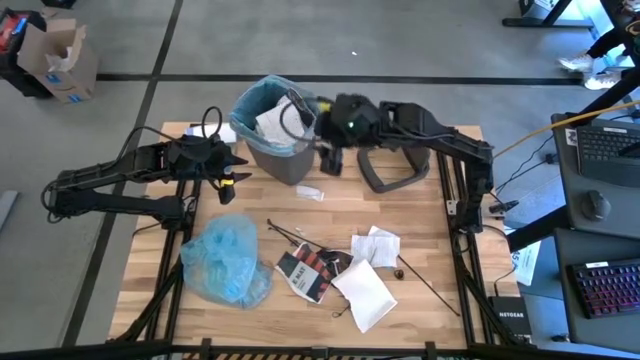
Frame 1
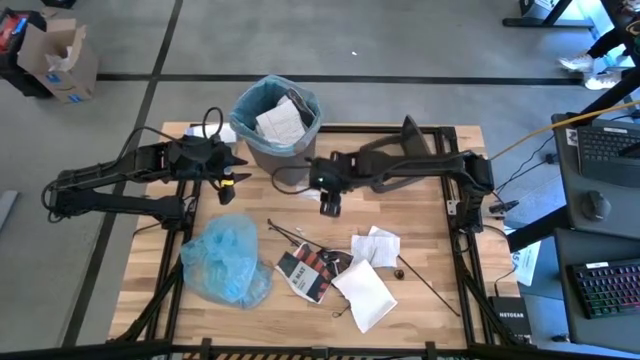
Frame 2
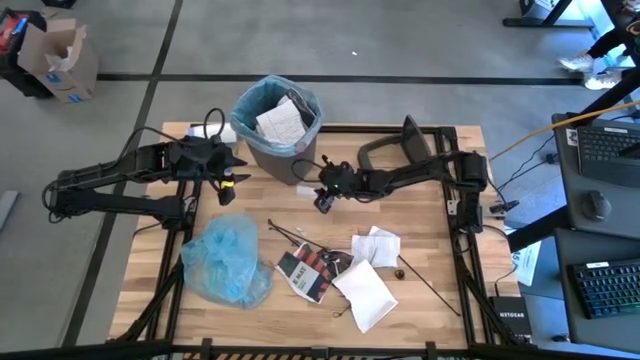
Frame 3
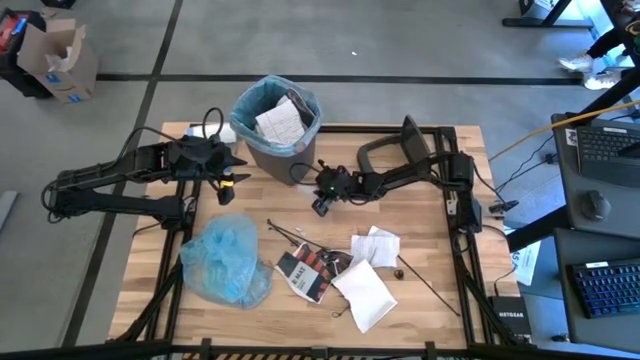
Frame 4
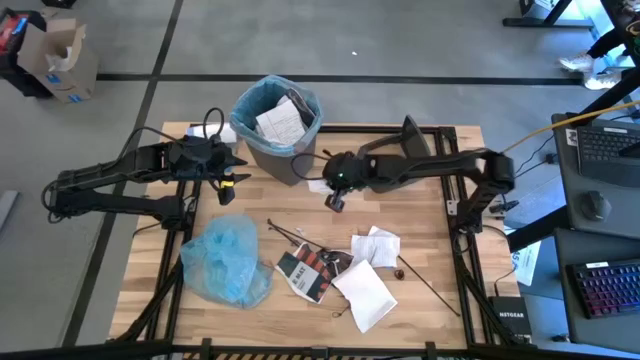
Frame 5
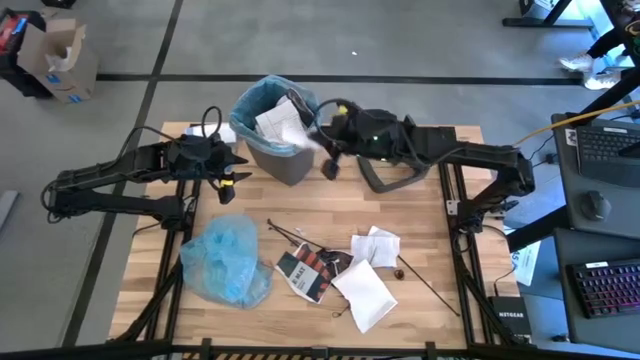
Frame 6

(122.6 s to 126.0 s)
Task: Pick and place trash into bin
Put the white paper into the trash bin

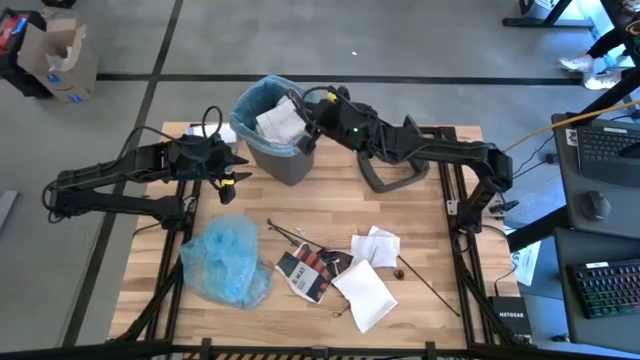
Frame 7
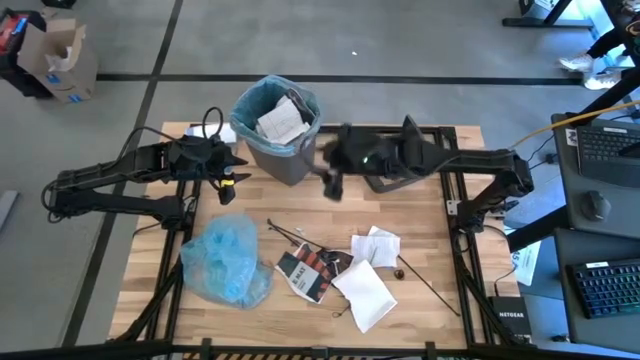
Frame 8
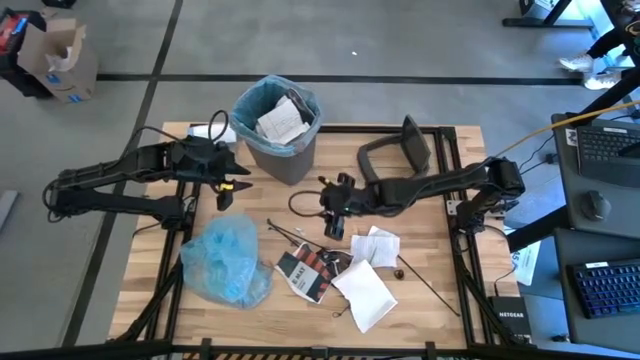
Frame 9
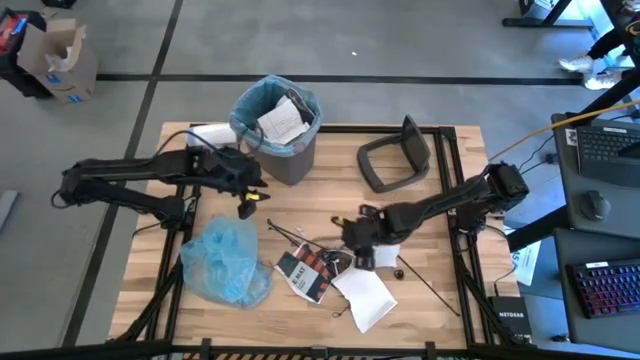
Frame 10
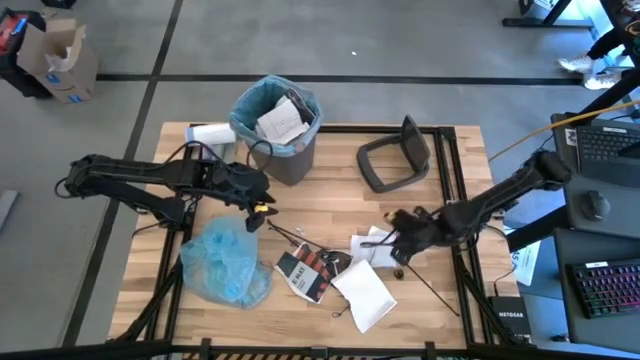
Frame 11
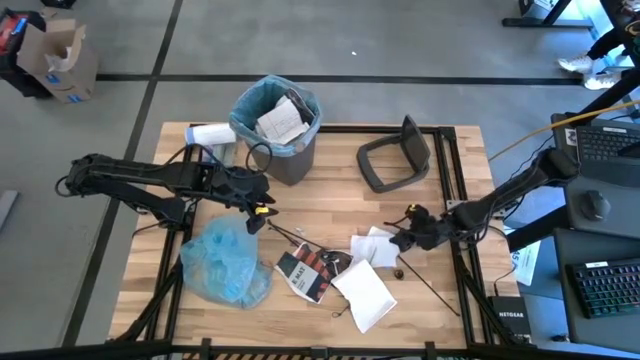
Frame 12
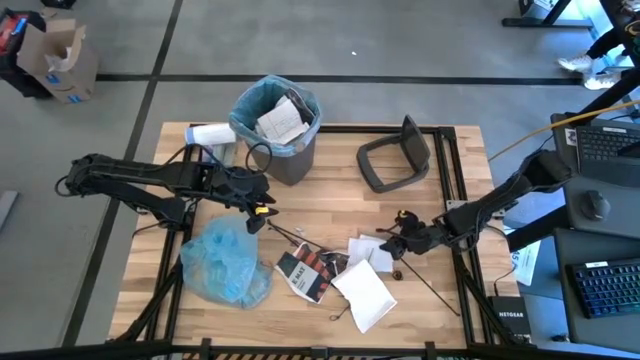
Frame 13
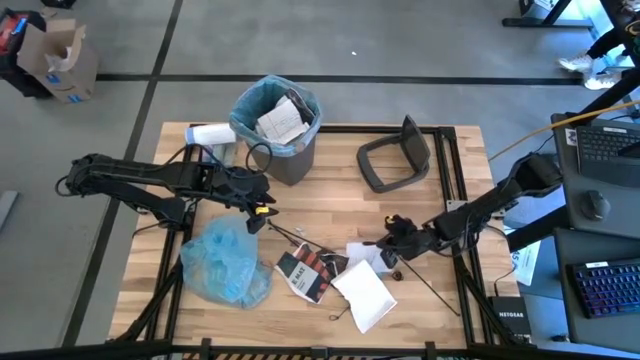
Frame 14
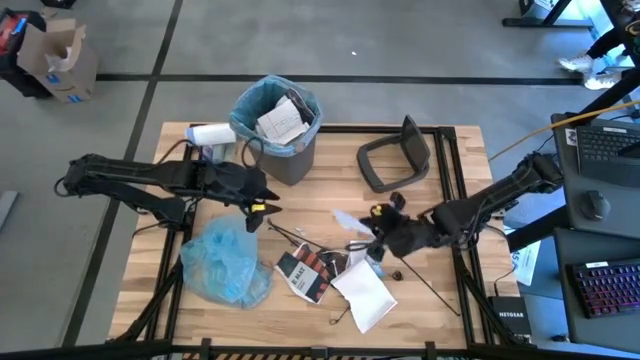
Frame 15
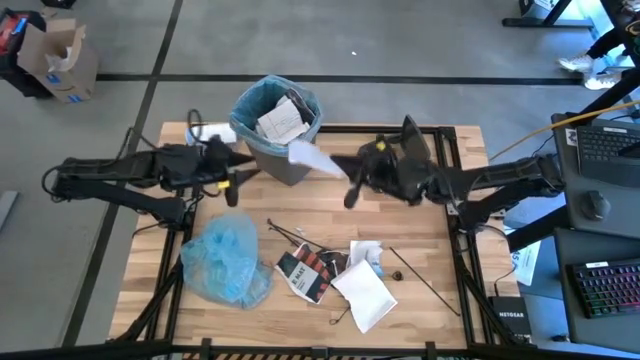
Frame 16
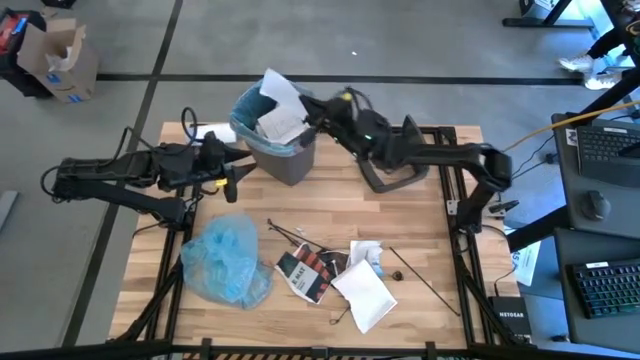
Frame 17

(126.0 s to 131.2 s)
Put the white notebook into the trash bin

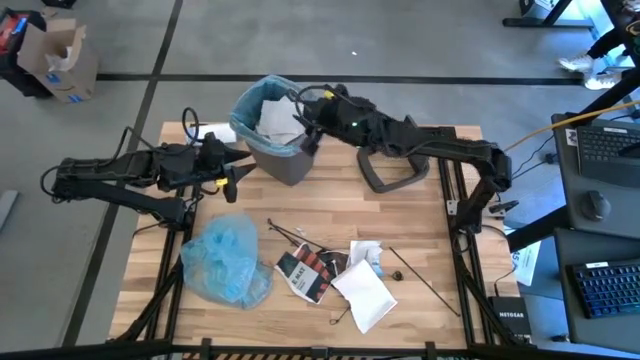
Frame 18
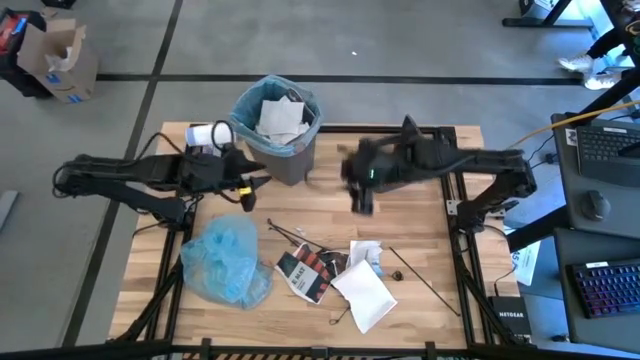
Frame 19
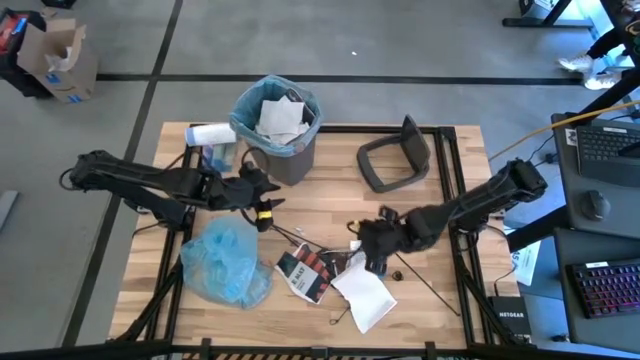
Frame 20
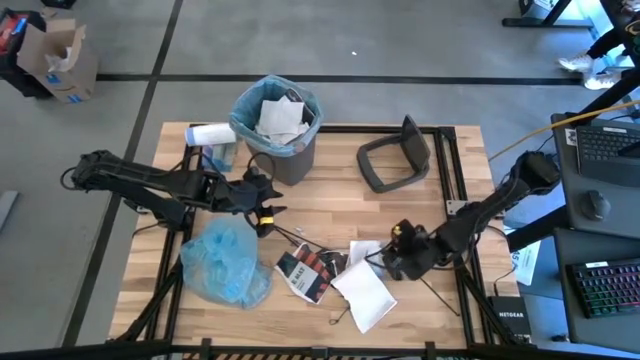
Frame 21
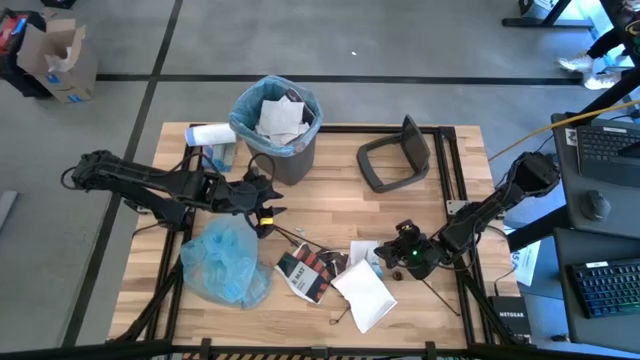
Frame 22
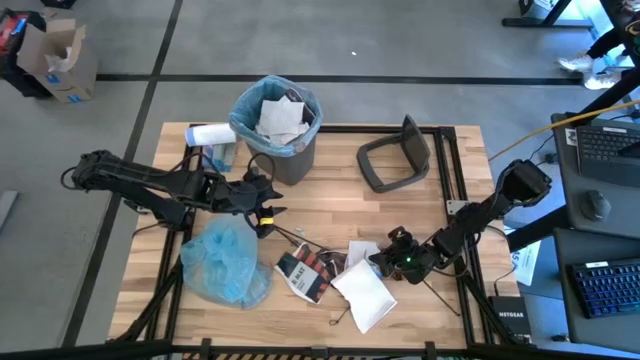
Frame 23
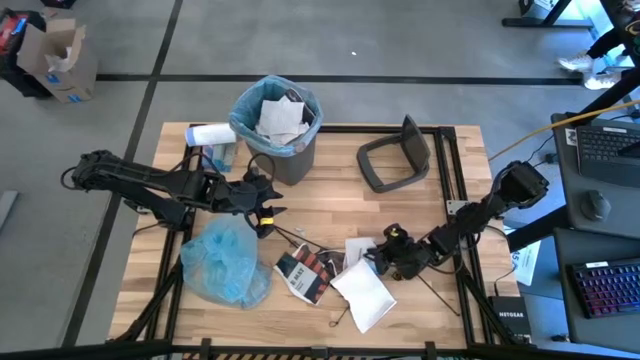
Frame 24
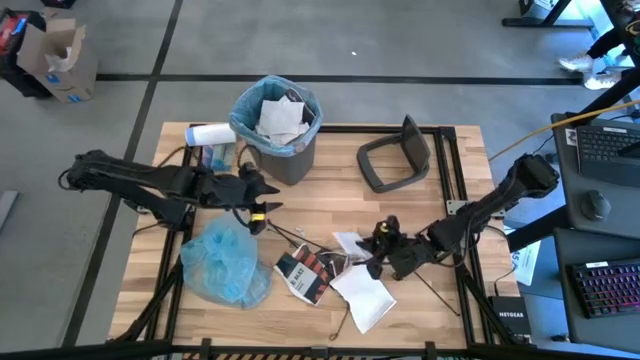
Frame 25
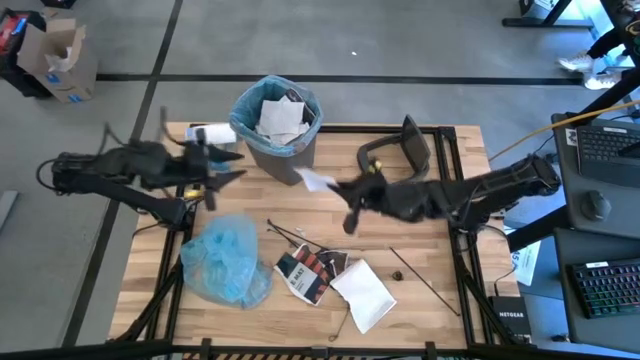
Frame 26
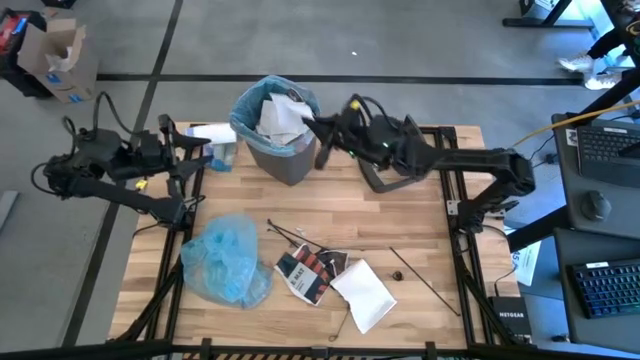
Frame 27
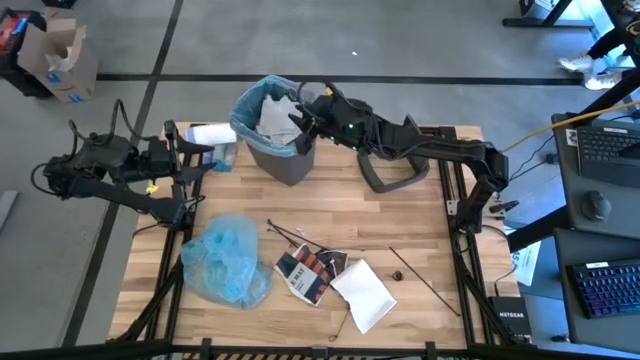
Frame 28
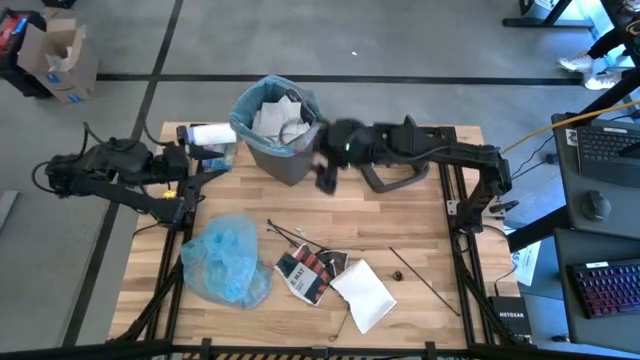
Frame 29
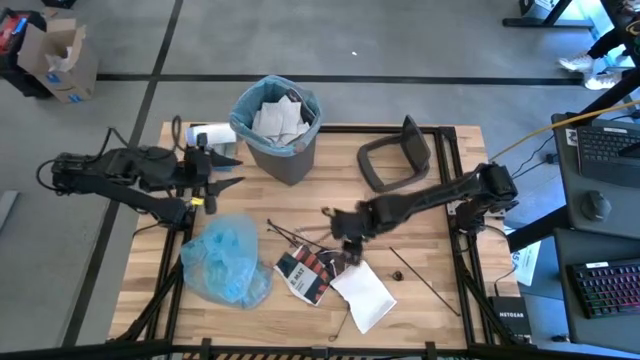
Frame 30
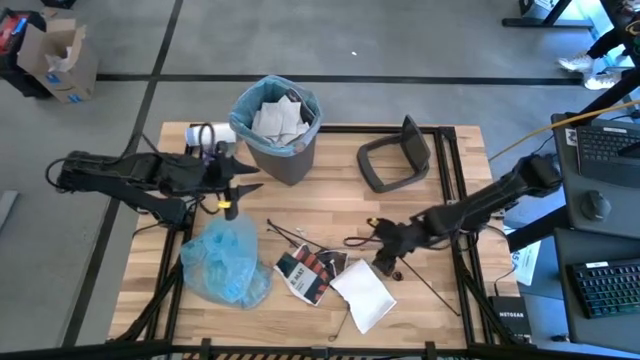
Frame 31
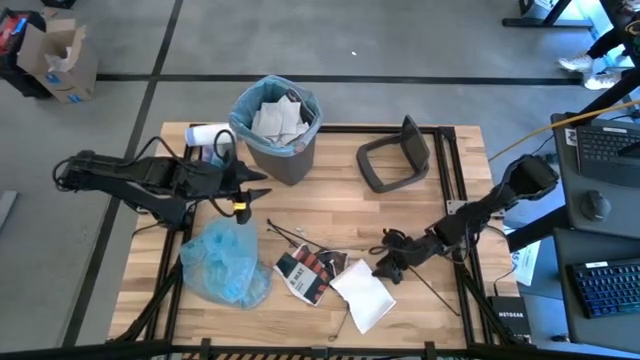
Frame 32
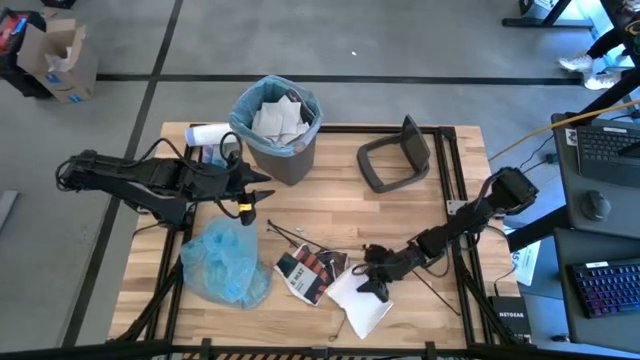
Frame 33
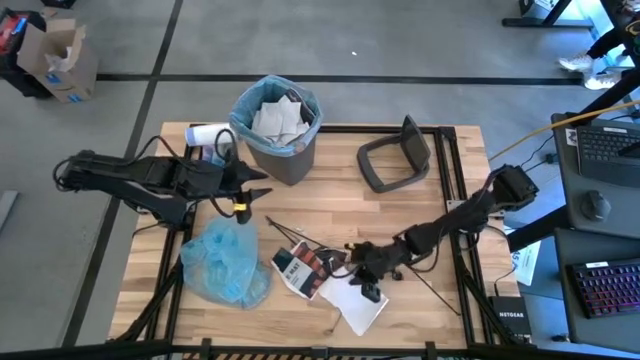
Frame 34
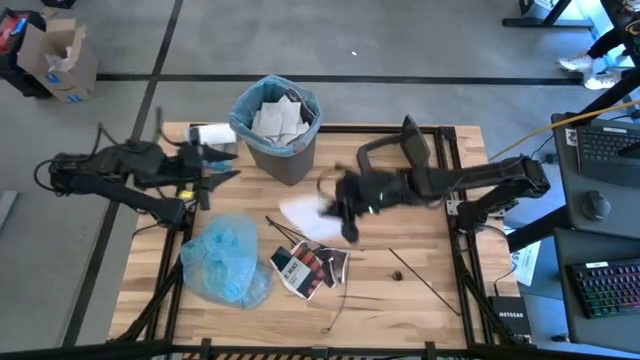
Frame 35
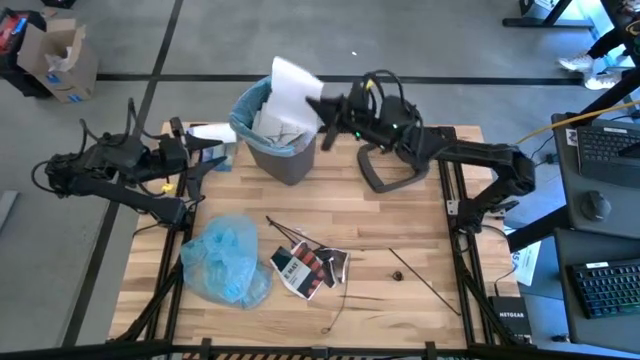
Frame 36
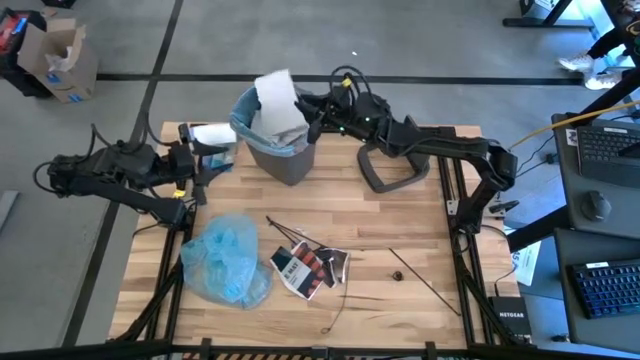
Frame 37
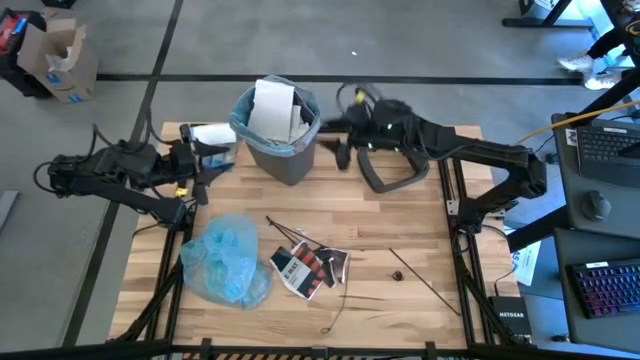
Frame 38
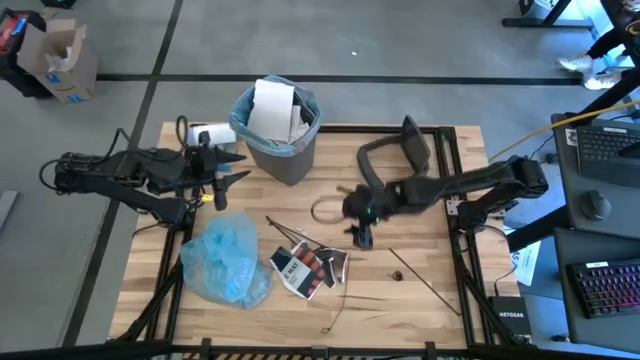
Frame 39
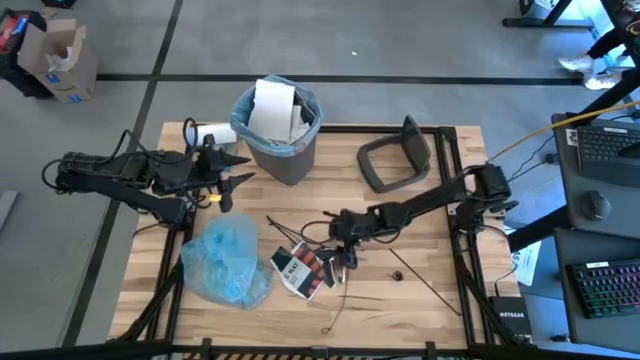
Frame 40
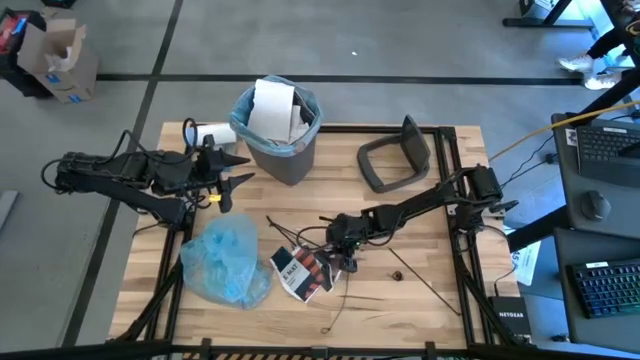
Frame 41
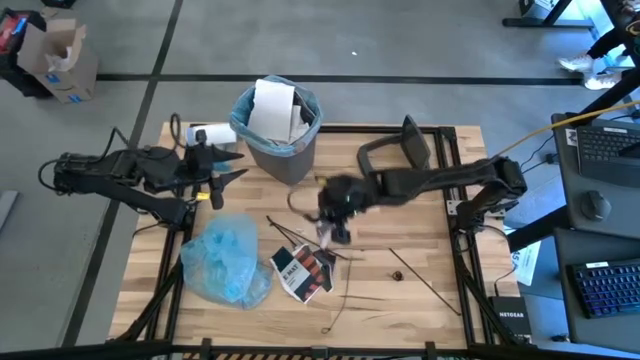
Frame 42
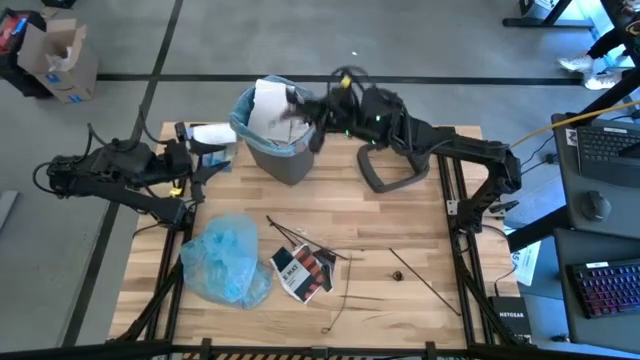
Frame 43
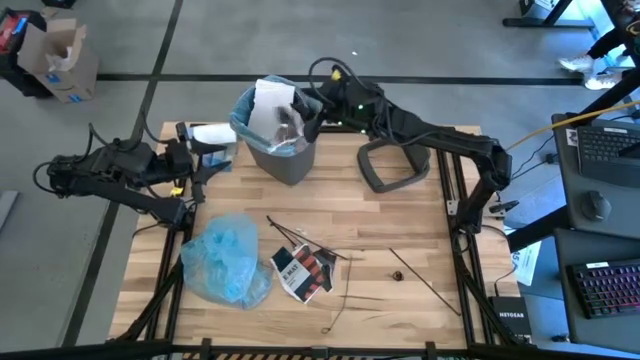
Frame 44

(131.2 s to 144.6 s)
Put the white paper into the trash bin
